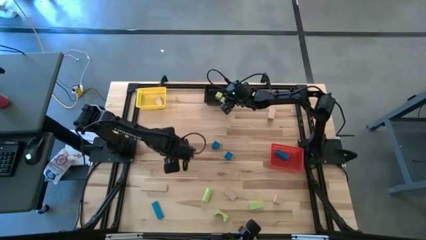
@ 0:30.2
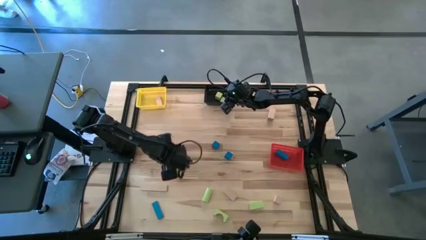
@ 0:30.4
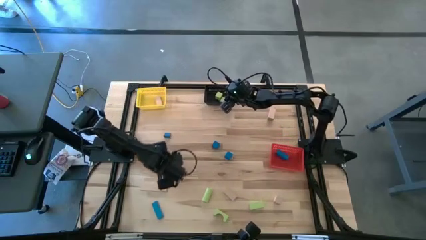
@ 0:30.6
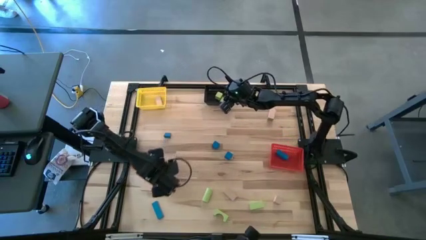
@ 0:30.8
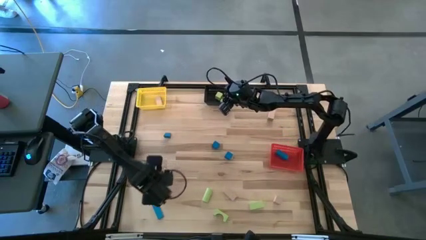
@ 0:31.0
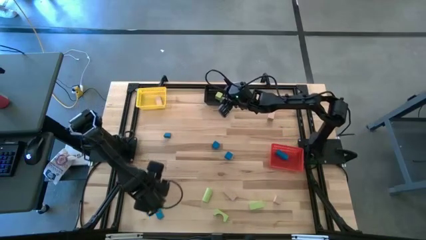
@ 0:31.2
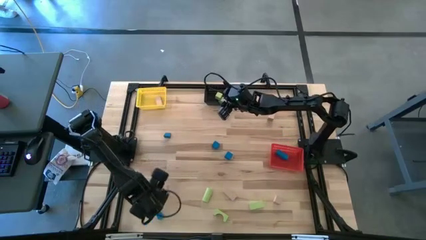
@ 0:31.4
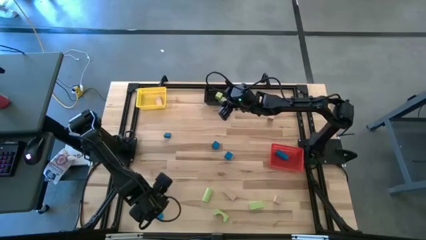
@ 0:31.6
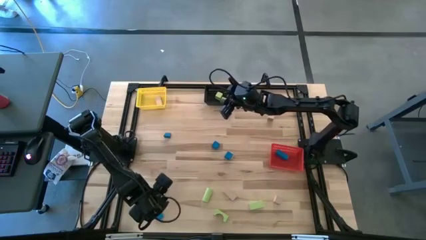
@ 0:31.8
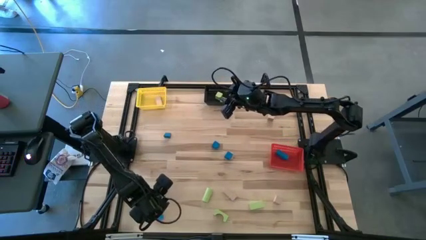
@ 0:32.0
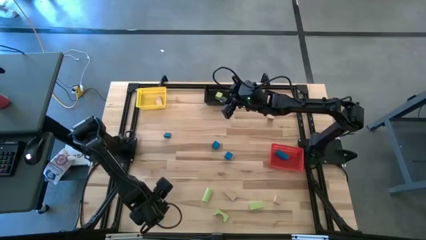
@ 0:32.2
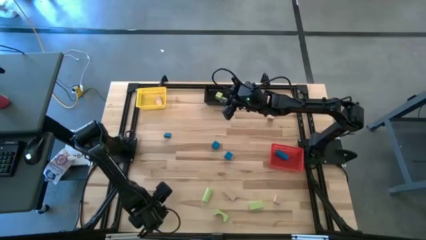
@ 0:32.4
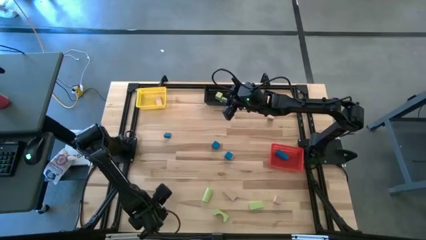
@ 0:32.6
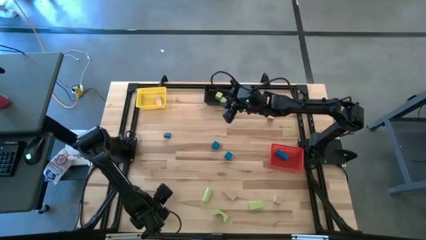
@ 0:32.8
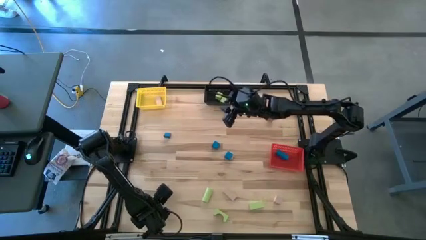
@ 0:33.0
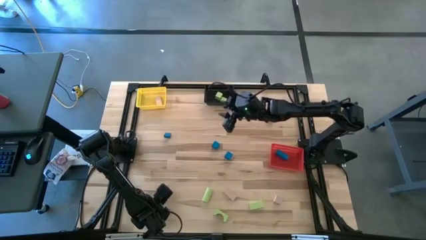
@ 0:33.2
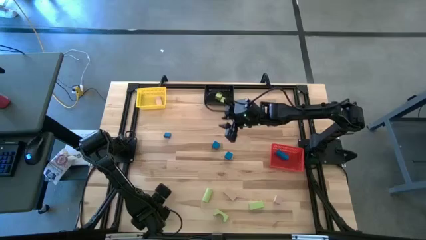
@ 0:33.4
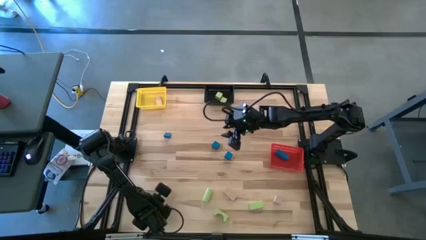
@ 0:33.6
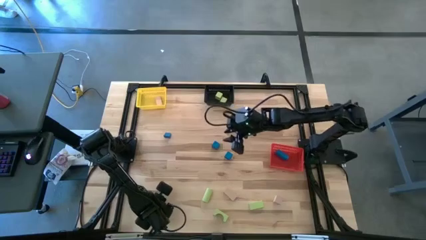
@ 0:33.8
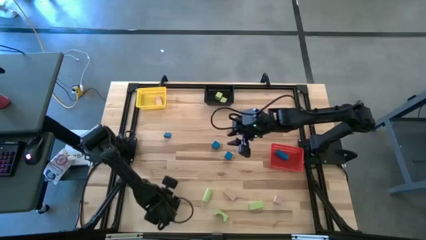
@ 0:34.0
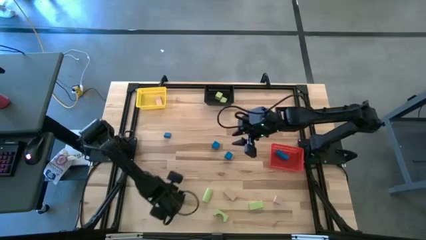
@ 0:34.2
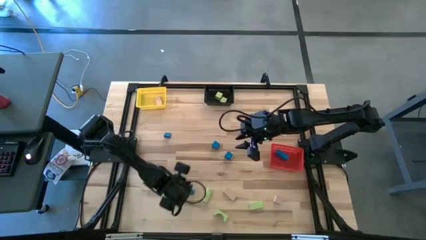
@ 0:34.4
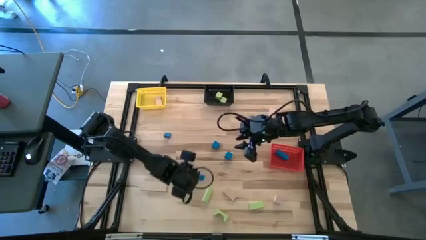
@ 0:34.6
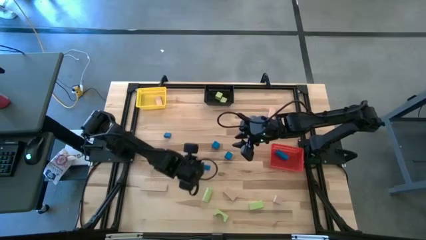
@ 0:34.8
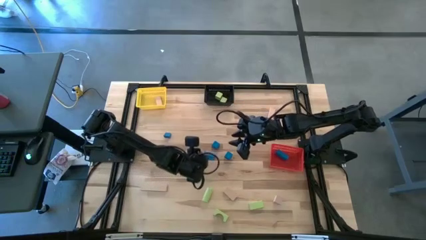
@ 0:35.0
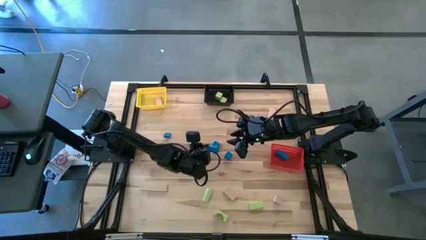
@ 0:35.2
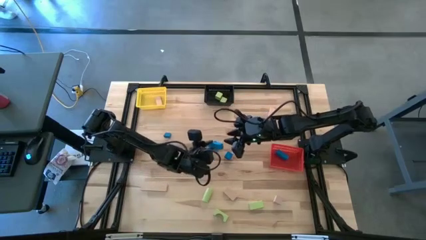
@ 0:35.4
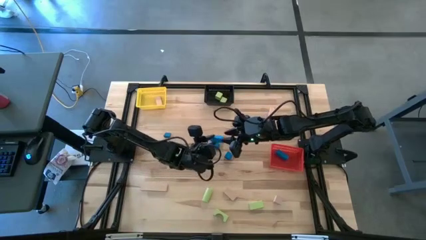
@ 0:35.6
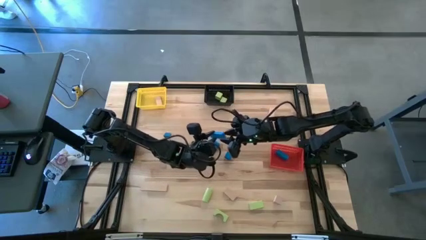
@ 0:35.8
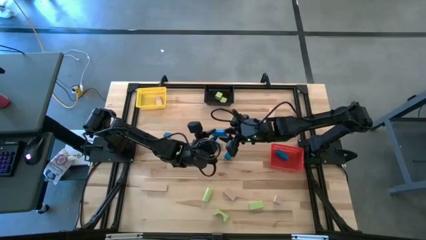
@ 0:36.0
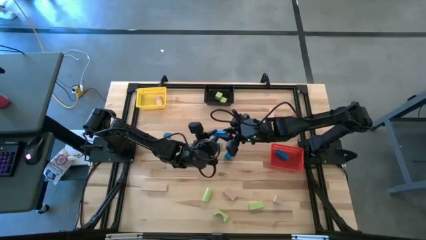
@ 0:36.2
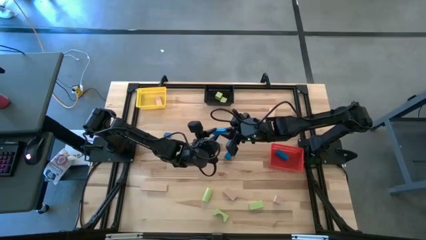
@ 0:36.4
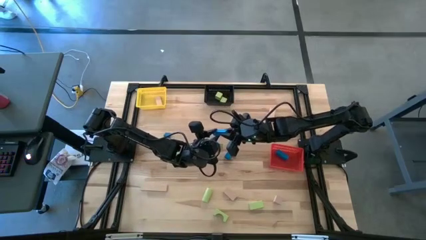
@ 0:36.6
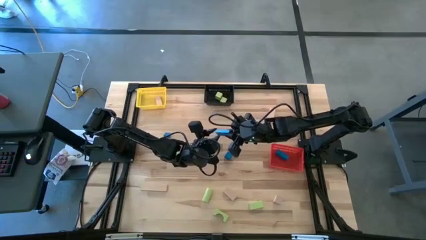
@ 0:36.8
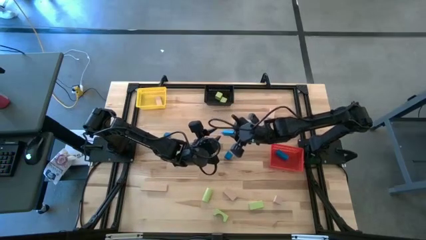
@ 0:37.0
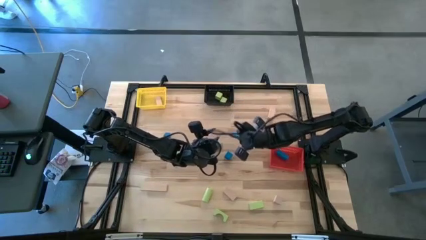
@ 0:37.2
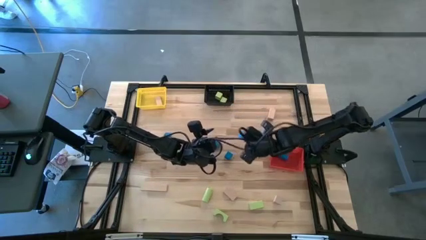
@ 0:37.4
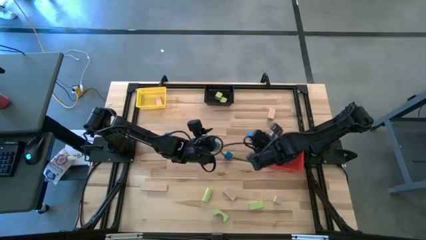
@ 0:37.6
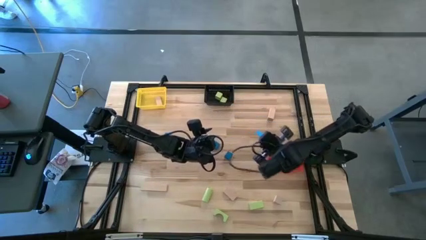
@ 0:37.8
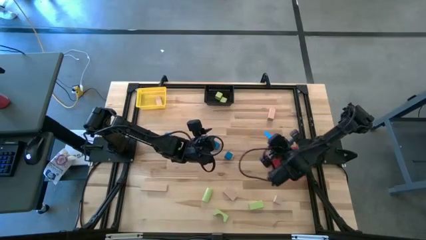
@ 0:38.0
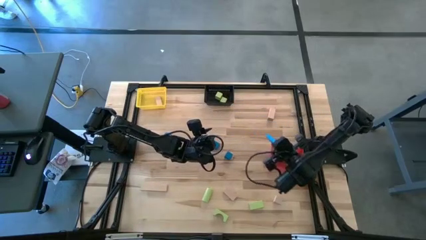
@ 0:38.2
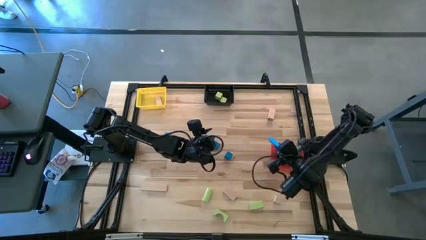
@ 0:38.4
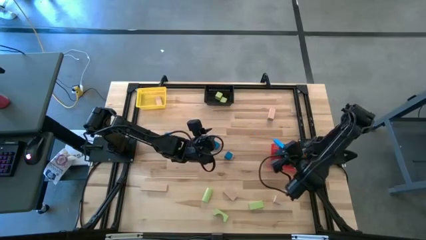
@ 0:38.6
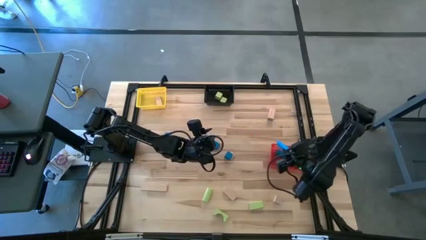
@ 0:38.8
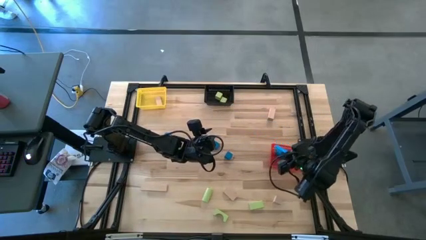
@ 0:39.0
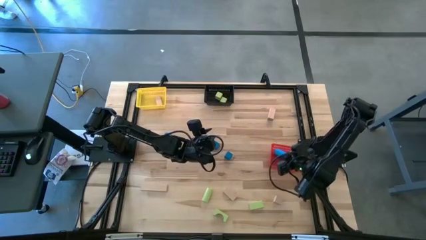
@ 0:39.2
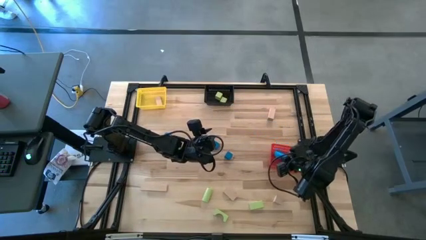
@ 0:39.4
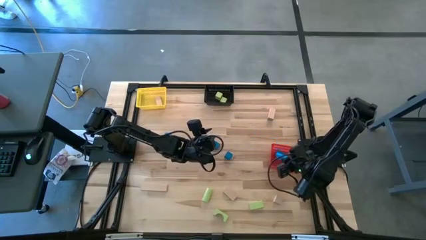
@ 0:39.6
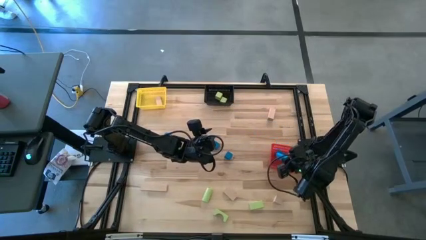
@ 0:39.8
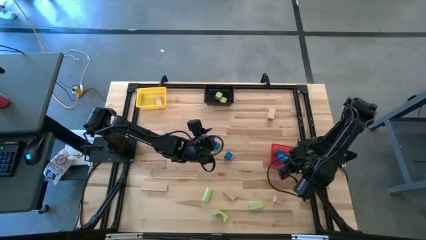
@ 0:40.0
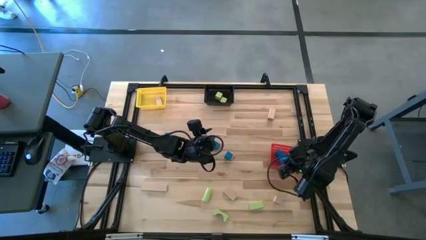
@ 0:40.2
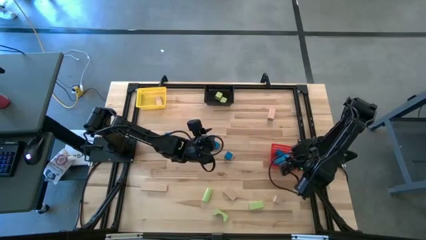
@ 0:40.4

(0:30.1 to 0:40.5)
Task: Sort & place blocks by color
Put the blue block into the red basket

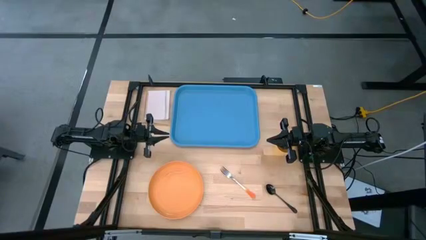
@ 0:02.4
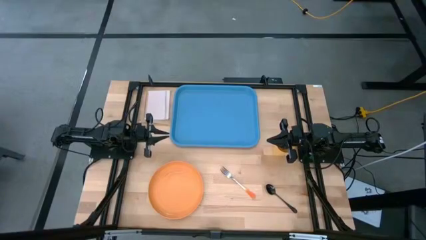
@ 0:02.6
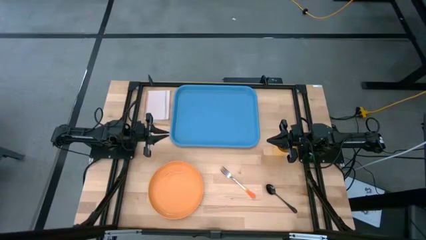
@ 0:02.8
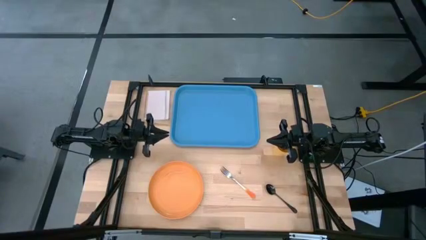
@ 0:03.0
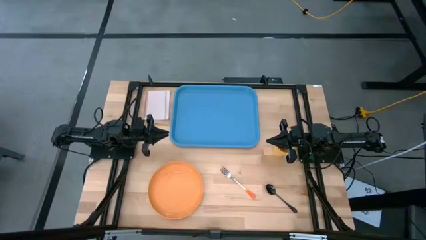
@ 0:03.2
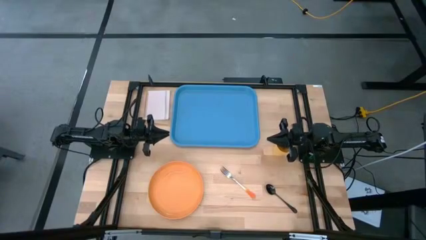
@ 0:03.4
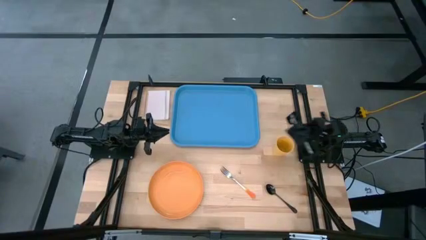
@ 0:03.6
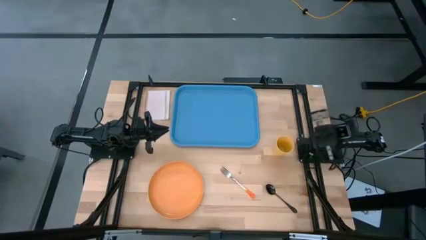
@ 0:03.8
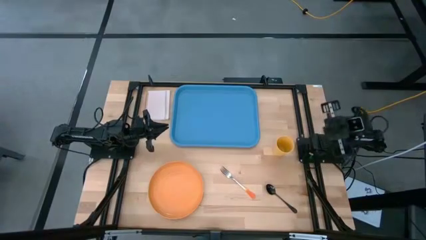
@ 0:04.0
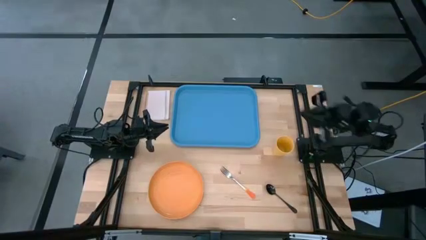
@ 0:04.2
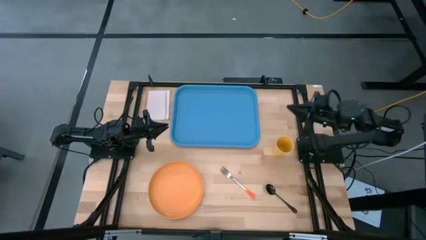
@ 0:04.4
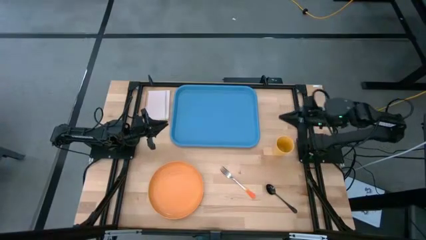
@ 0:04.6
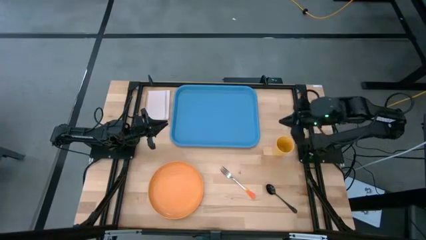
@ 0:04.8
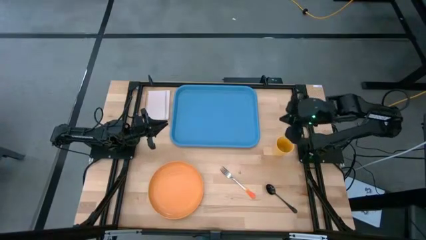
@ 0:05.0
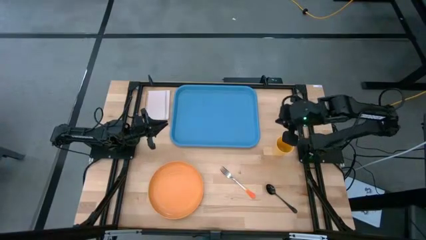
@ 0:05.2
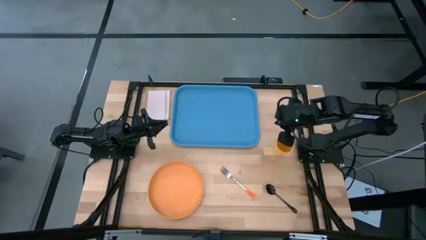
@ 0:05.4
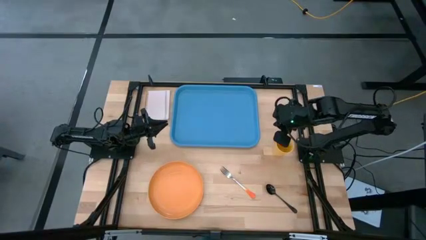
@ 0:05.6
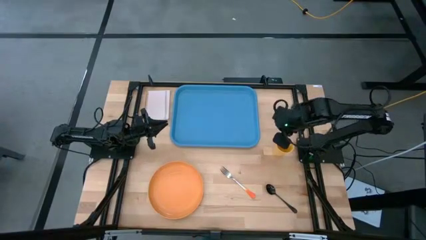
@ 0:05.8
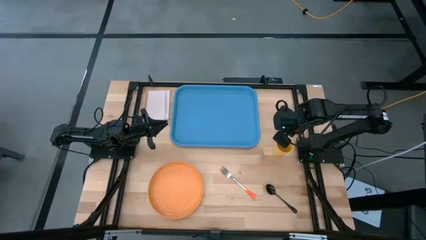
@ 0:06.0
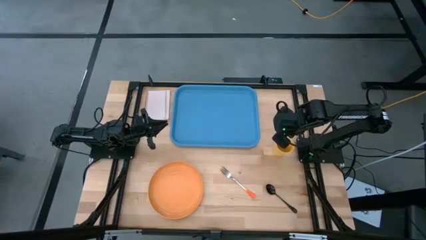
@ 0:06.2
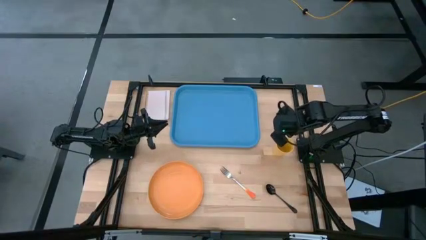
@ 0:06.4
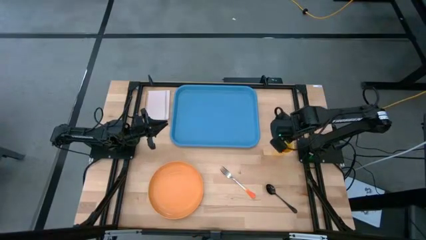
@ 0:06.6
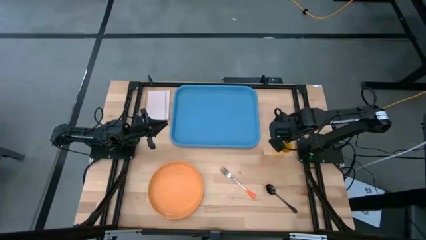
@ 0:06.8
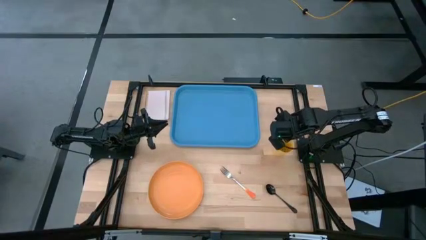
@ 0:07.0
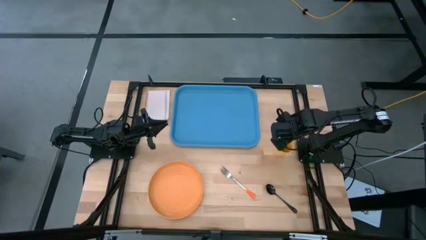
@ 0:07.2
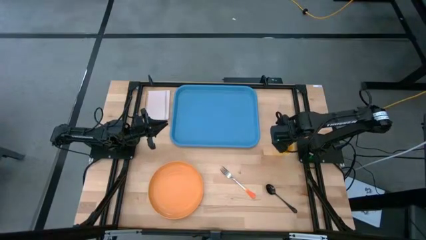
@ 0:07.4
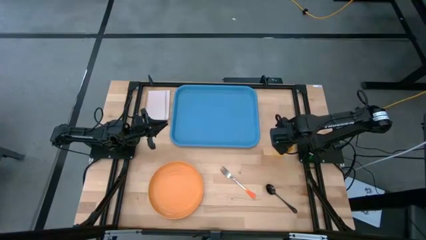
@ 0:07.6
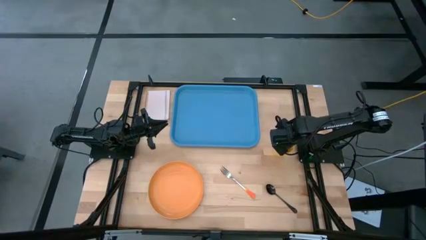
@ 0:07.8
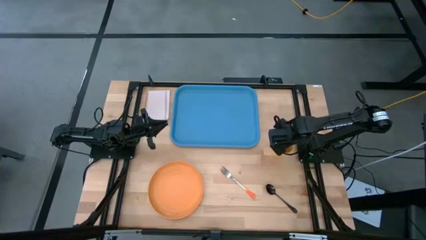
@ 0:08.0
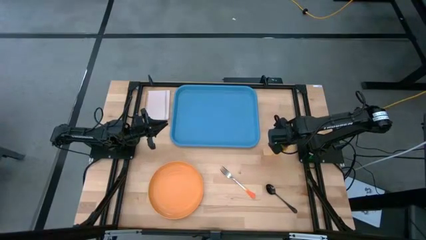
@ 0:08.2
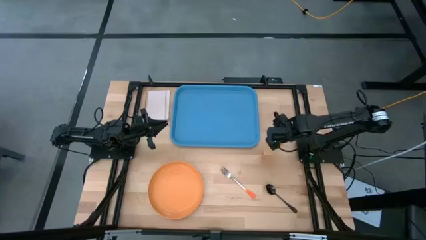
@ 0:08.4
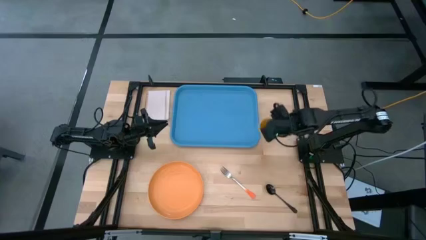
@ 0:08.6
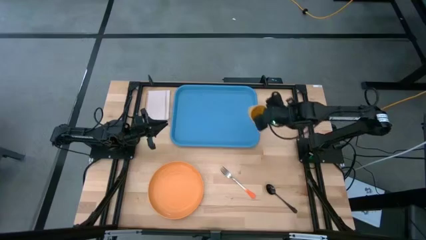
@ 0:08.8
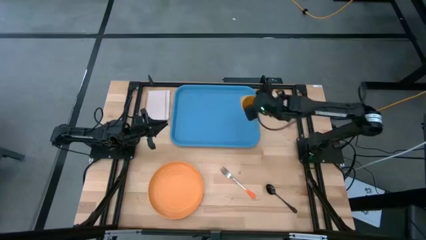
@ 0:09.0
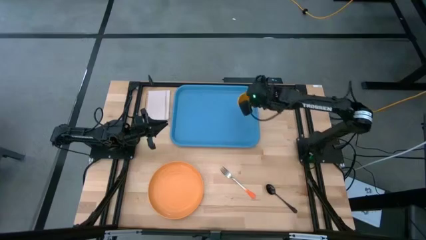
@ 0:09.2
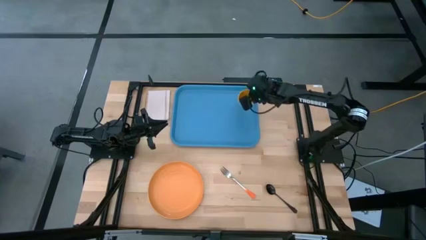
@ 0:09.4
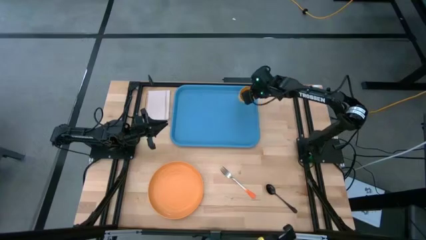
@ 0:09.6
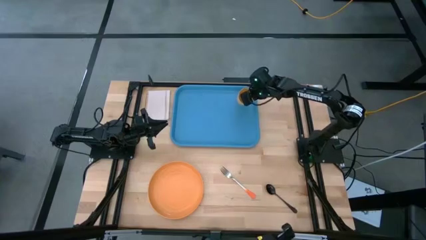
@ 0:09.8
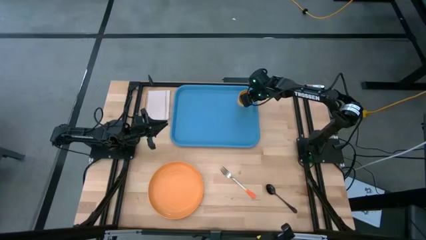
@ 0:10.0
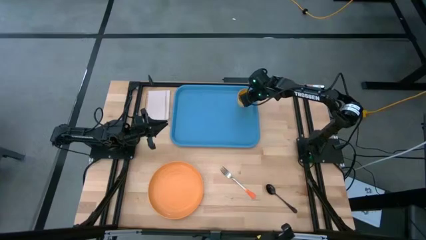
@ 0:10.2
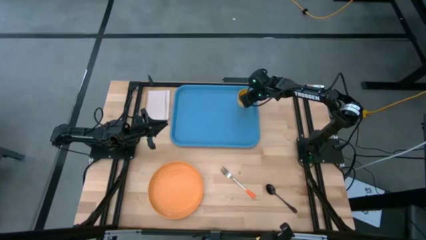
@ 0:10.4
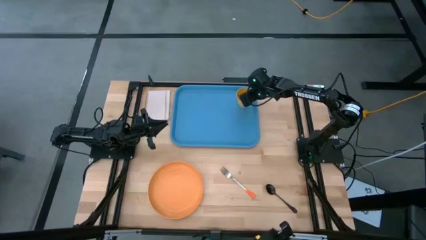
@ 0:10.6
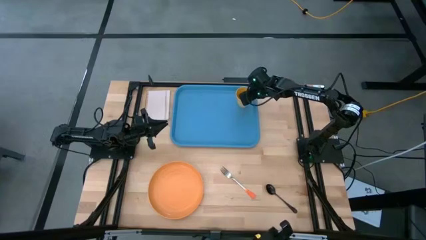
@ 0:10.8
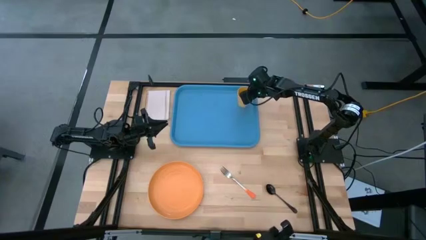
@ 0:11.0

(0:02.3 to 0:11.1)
Task: Pick and place plate/cup/fork/spoon on tray
Put the yellow cup on the blue tray
